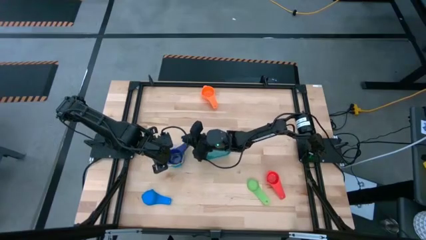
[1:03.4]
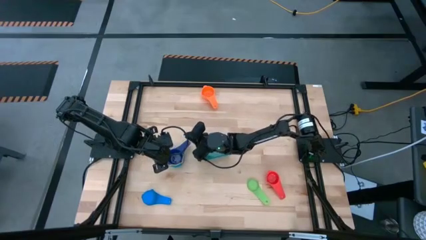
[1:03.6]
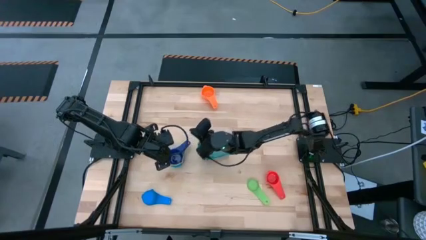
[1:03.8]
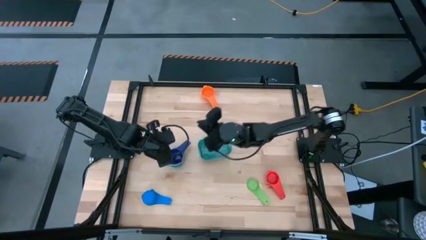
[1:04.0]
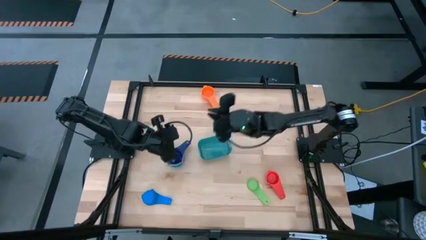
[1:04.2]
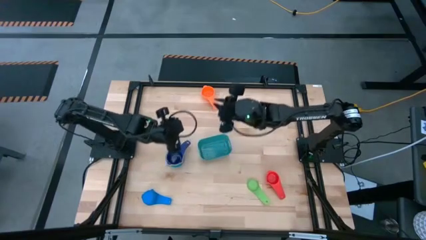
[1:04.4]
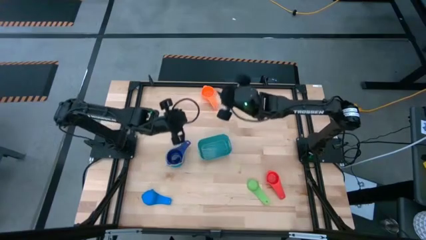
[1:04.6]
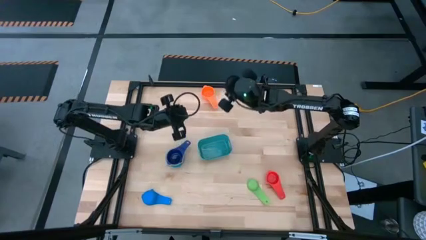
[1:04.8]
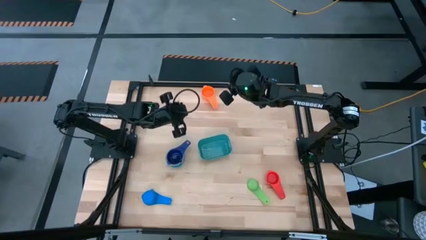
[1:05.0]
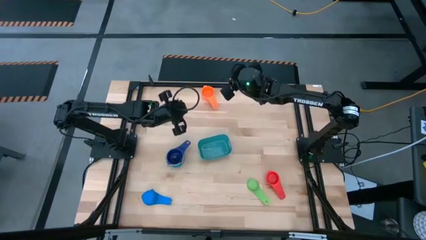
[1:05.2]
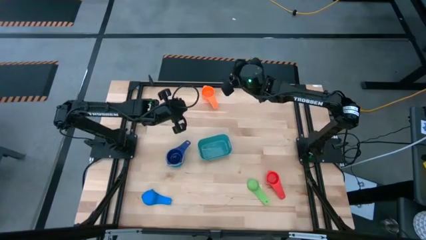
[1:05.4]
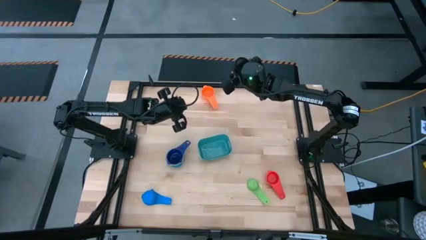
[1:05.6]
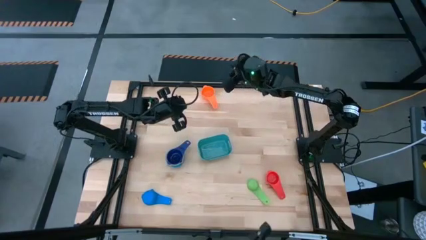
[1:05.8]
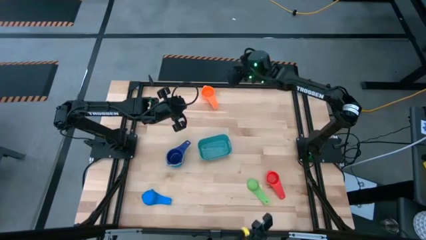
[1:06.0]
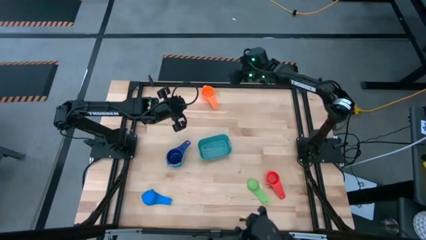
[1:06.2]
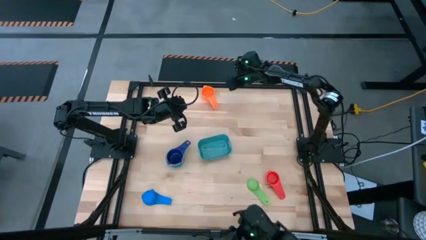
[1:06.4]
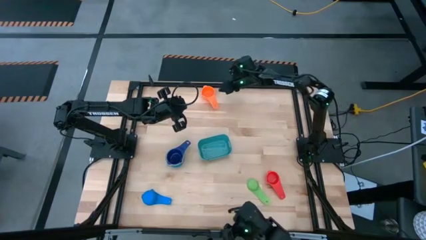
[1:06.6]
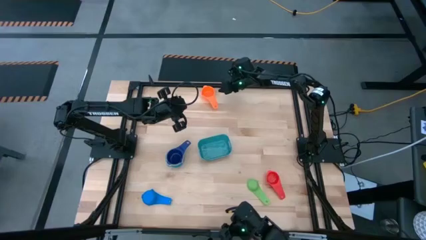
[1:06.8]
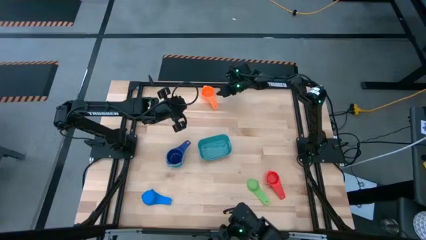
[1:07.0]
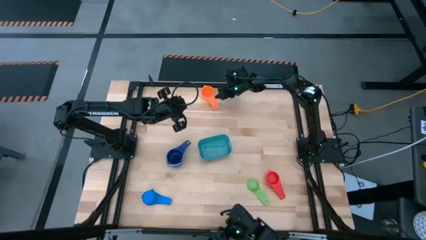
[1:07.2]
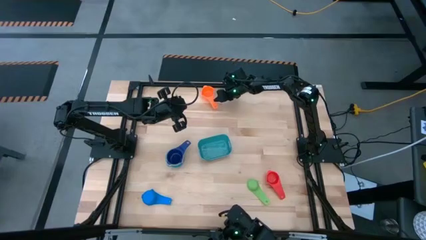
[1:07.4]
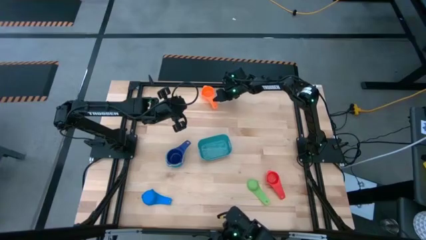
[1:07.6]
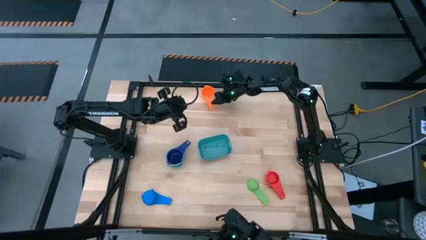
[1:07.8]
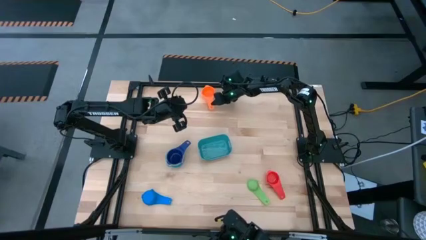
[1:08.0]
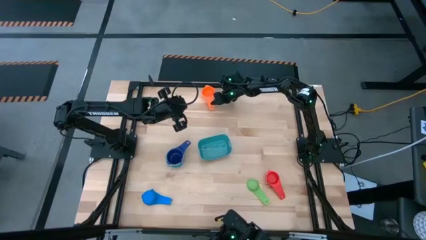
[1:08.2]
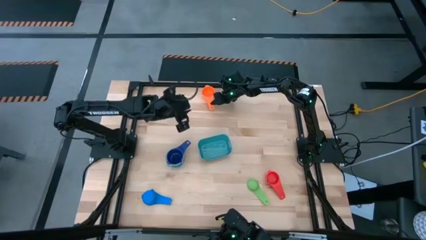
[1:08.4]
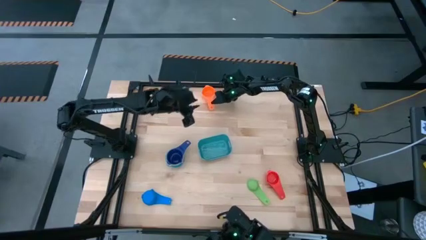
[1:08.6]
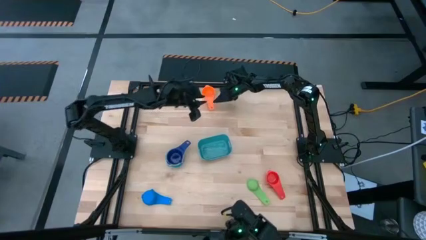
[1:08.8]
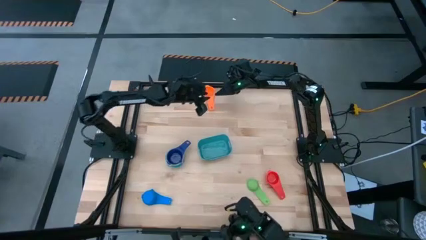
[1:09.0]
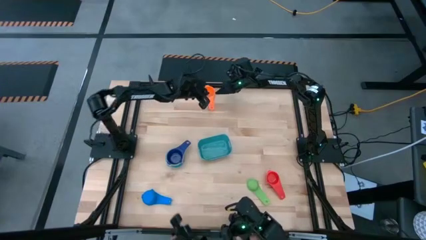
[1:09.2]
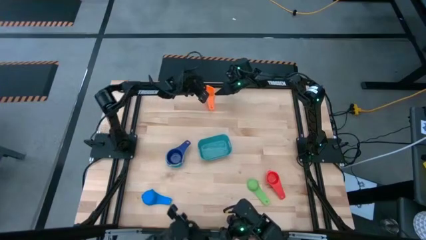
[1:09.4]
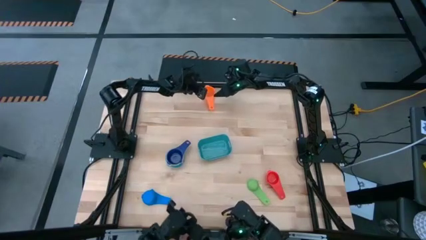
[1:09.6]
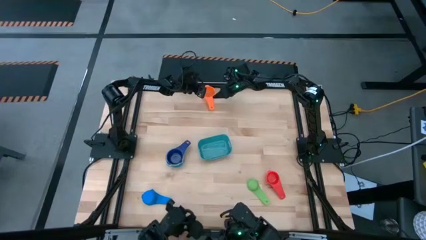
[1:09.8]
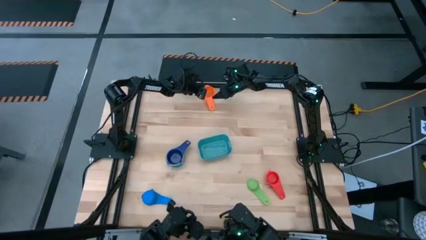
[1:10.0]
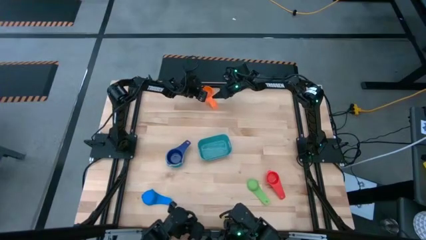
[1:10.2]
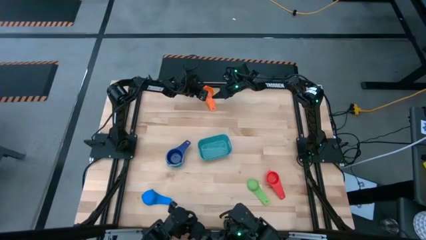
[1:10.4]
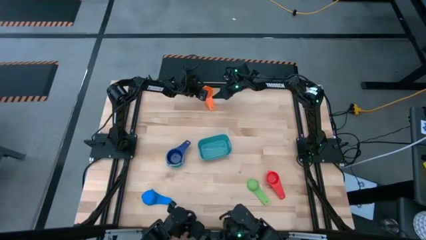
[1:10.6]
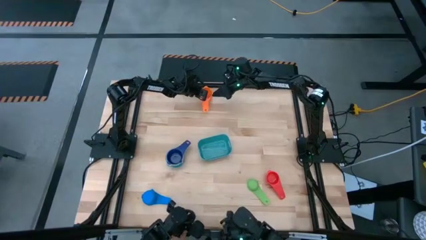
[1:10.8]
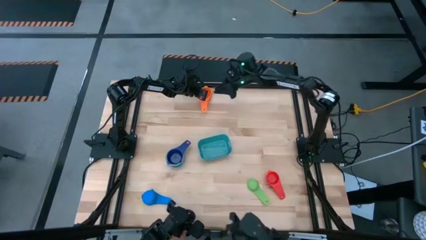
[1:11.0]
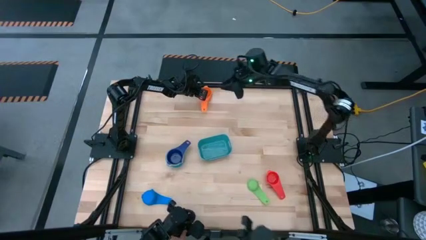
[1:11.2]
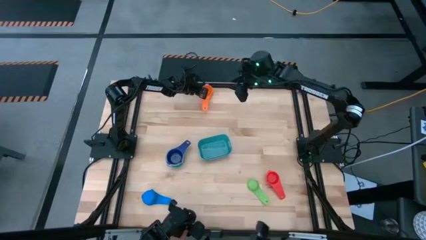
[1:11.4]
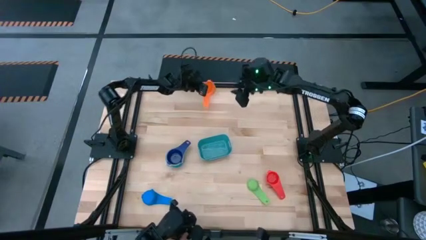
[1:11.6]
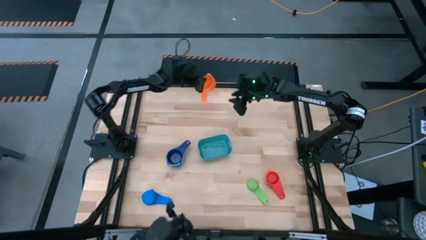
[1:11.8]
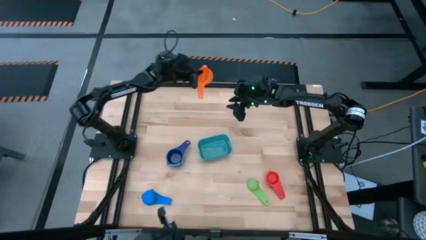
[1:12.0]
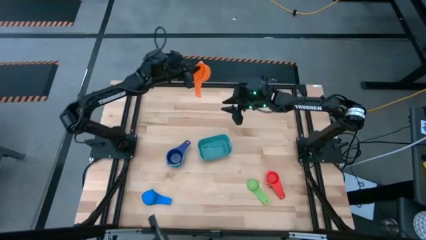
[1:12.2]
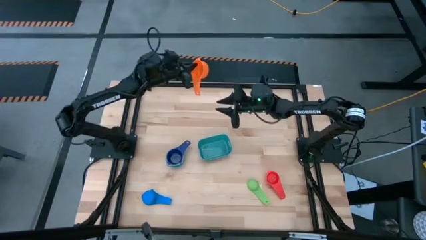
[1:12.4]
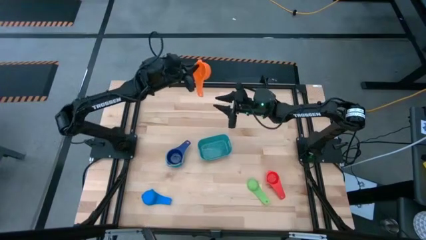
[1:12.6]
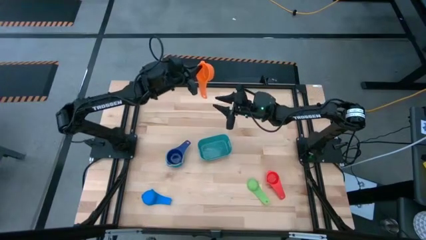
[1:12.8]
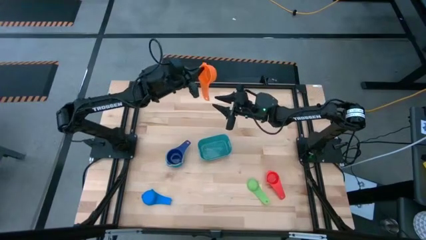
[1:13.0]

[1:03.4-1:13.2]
Task: Nest measuring cups in basket
Stack the orange measuring cup on top of the dark blue measuring cup

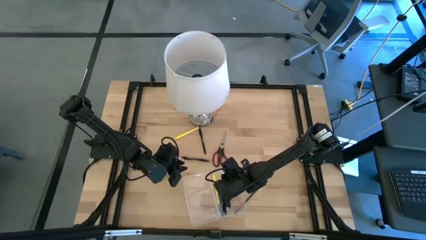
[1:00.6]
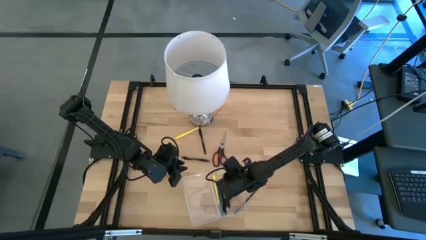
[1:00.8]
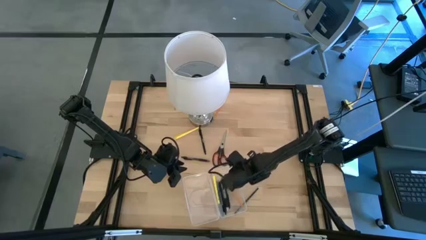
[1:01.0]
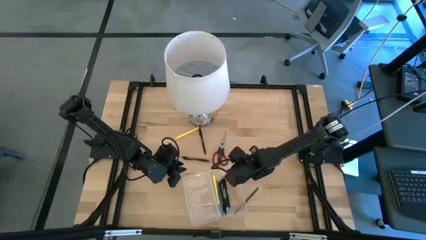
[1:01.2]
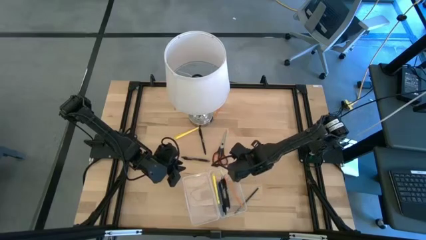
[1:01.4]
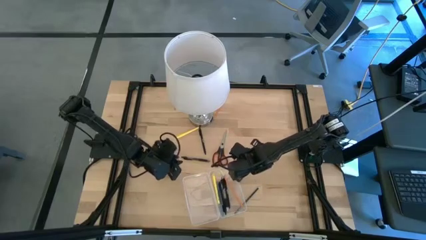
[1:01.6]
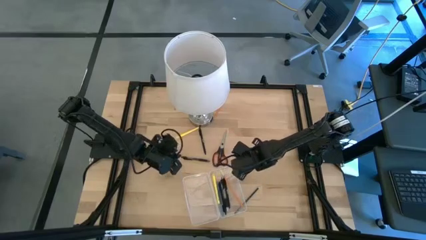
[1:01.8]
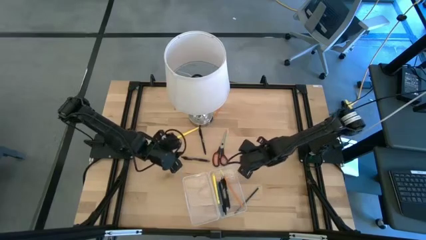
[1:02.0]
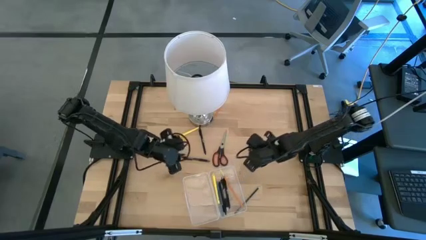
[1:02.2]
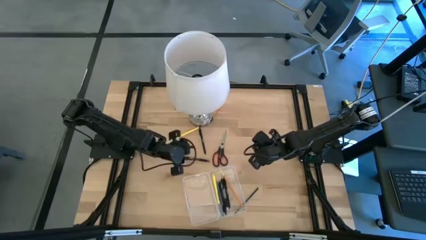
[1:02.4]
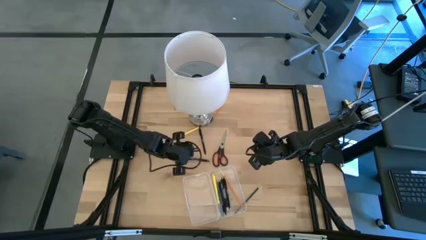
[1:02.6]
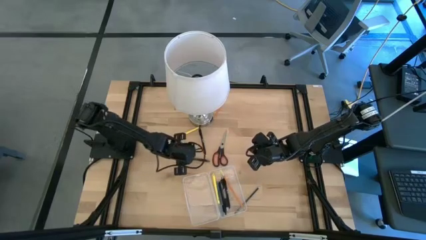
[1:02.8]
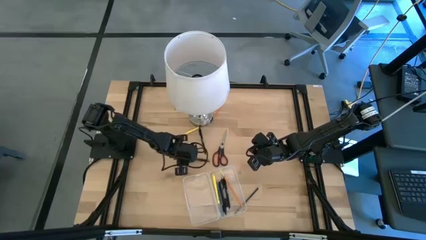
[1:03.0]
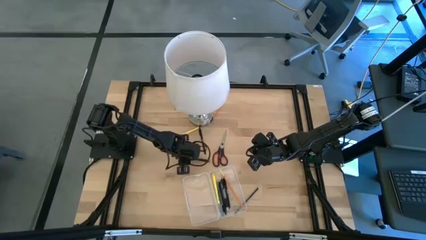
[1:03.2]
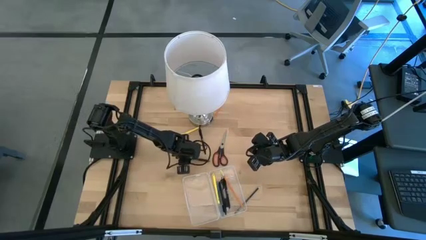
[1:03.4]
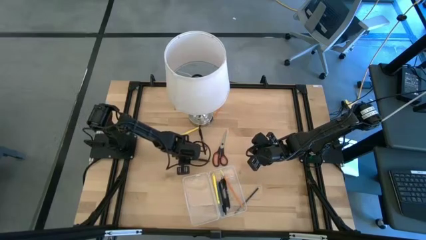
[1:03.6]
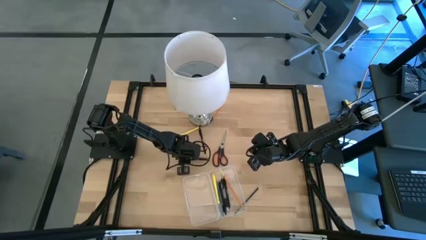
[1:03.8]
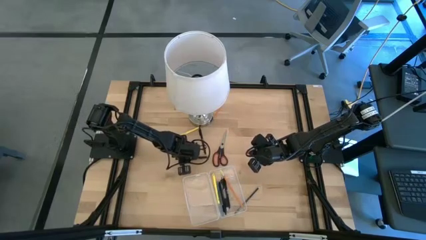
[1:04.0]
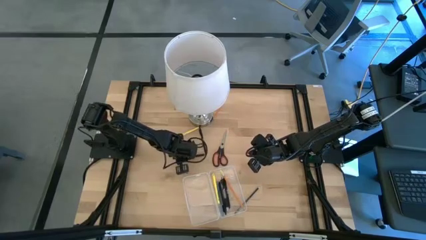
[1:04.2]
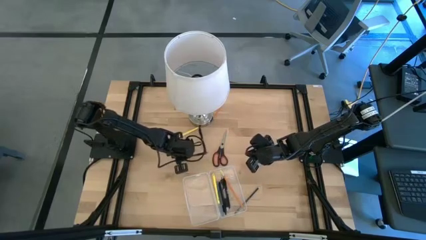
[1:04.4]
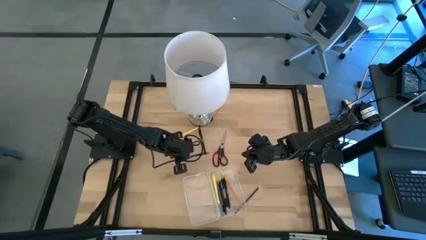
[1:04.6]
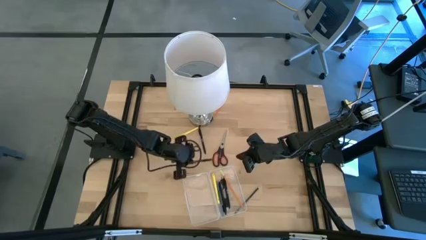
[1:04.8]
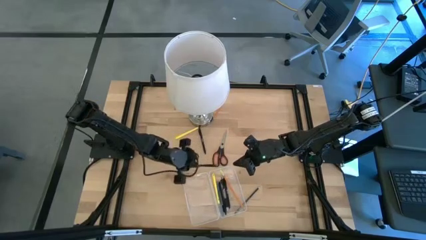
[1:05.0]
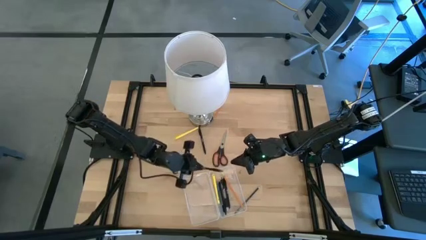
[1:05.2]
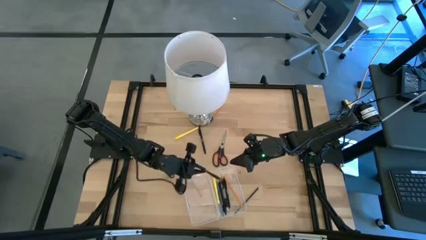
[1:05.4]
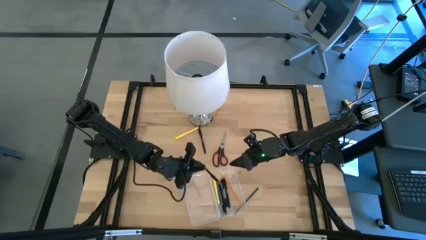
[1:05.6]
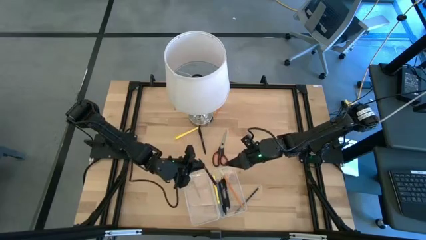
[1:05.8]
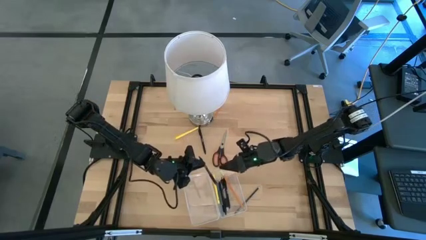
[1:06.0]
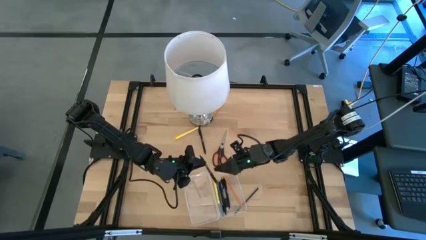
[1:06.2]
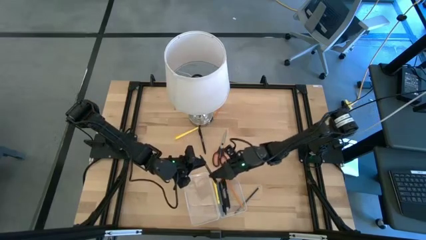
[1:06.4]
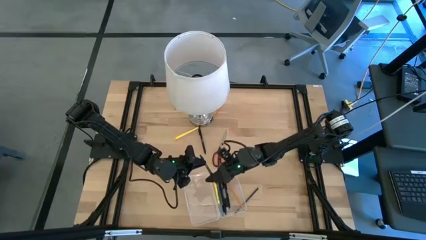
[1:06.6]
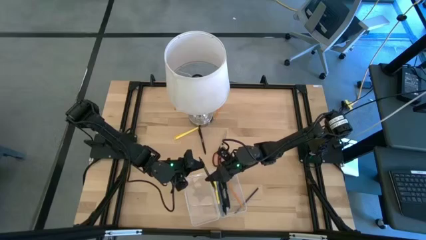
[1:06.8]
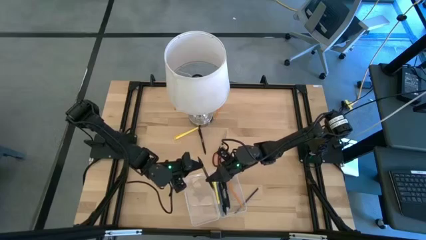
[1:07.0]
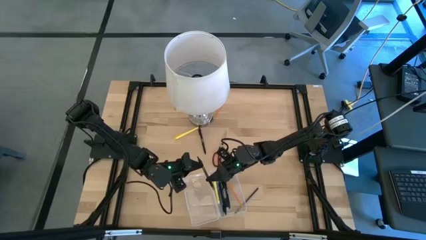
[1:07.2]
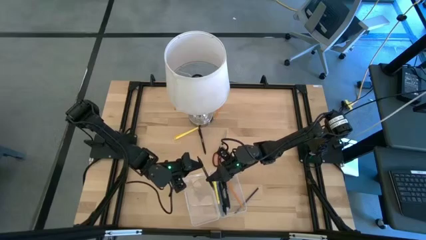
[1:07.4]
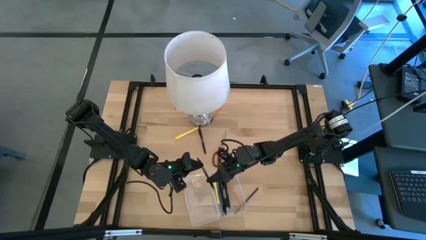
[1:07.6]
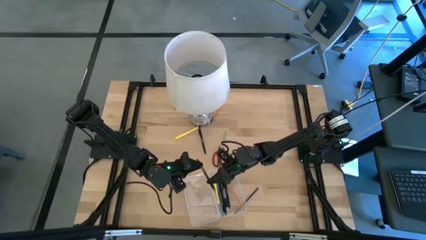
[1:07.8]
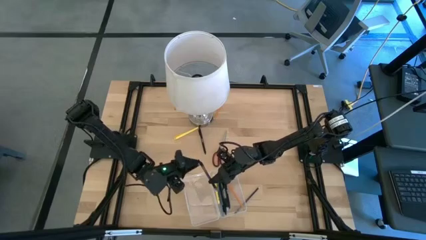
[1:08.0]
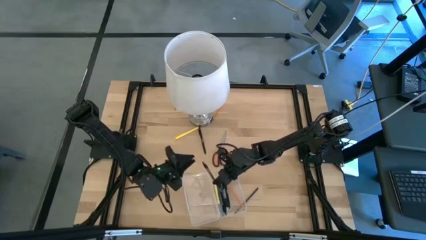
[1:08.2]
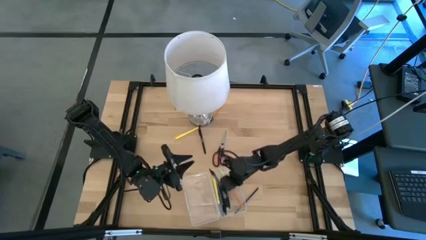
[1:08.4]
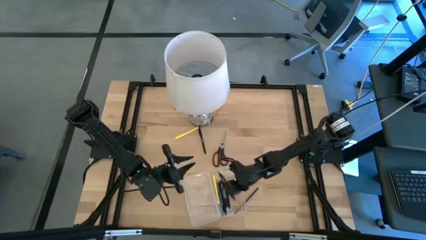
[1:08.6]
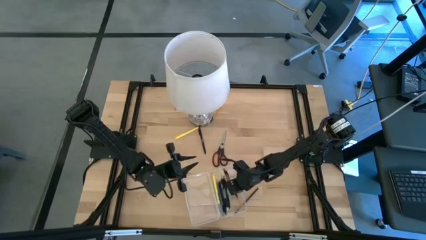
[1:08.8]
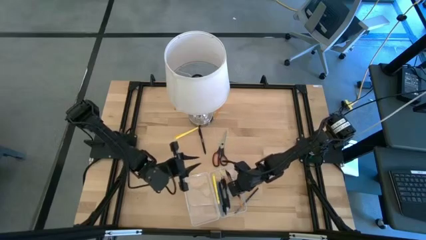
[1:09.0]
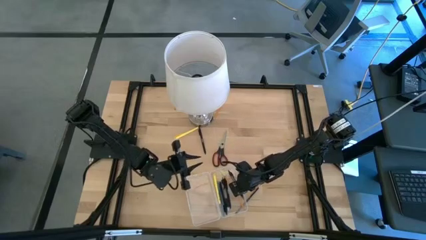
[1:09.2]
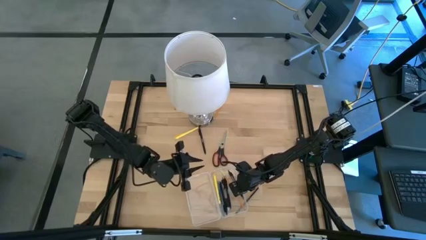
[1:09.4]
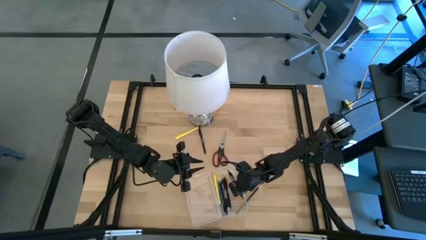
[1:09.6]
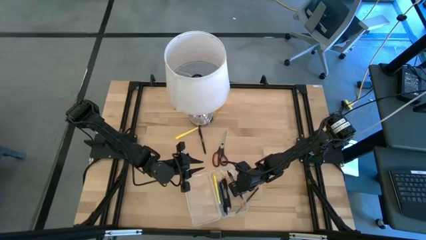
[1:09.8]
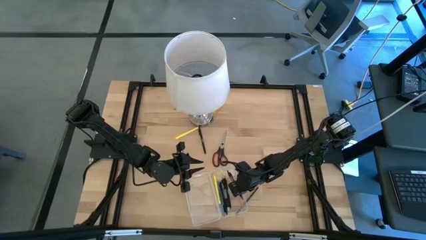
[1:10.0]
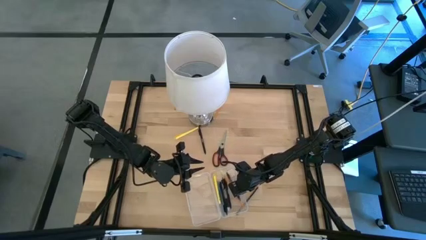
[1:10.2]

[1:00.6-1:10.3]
Task: Pick & place school supplies into a supply box
Put the black white pen into the transparent supply box
